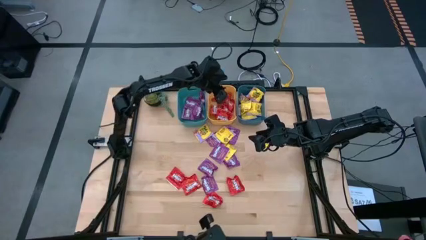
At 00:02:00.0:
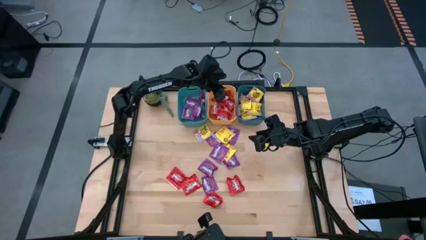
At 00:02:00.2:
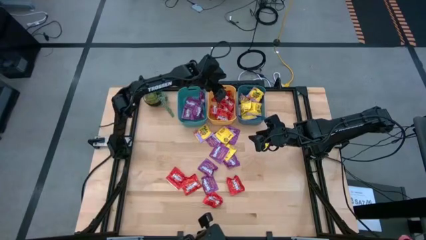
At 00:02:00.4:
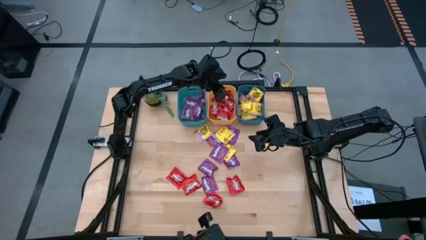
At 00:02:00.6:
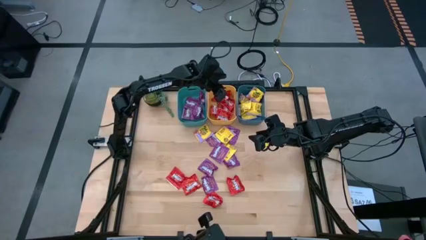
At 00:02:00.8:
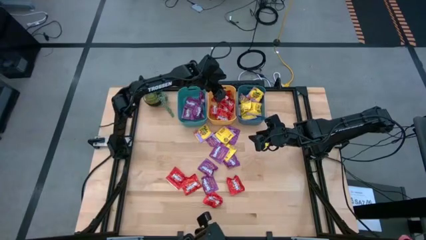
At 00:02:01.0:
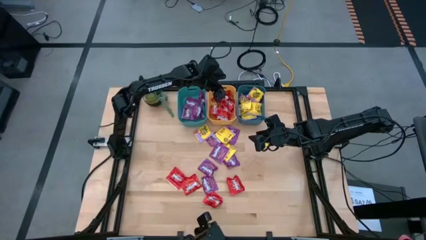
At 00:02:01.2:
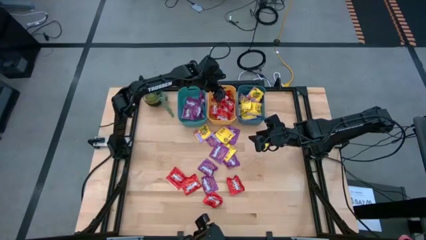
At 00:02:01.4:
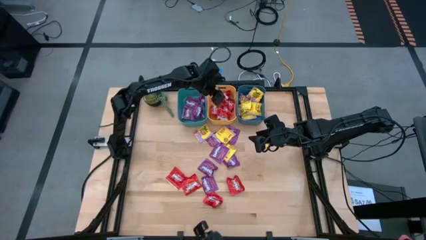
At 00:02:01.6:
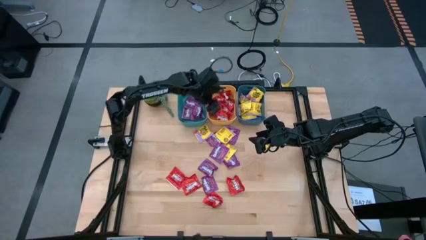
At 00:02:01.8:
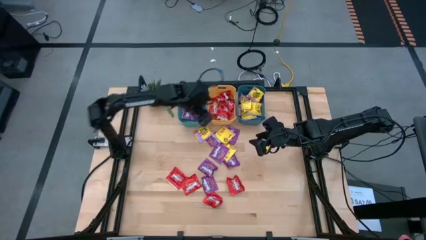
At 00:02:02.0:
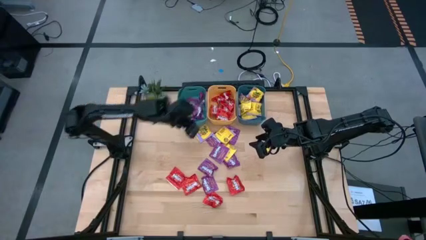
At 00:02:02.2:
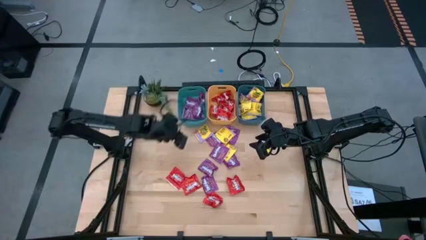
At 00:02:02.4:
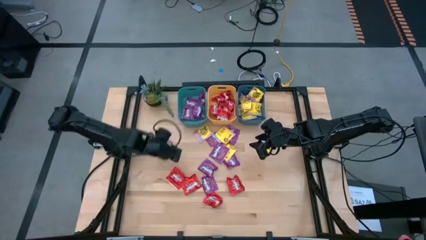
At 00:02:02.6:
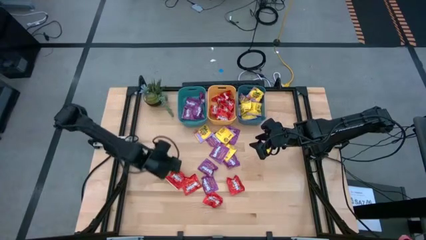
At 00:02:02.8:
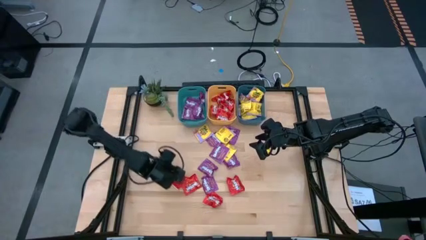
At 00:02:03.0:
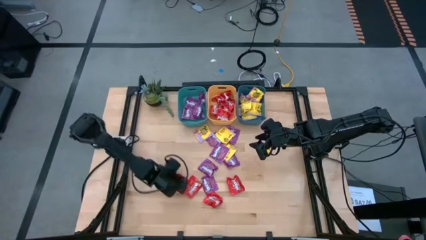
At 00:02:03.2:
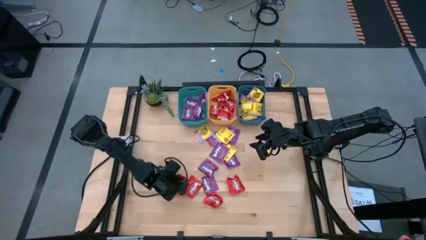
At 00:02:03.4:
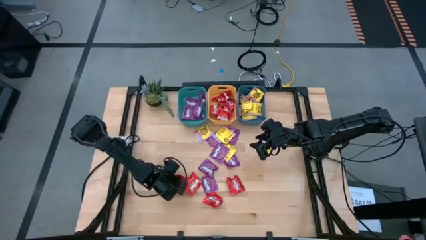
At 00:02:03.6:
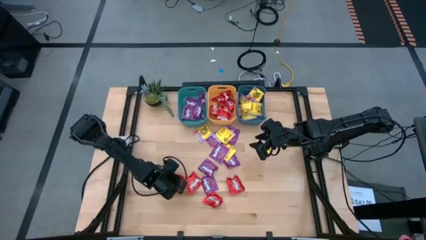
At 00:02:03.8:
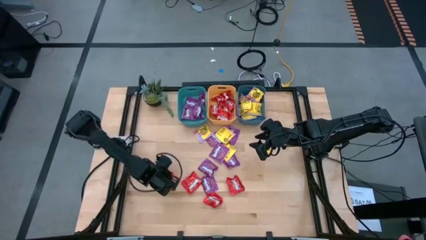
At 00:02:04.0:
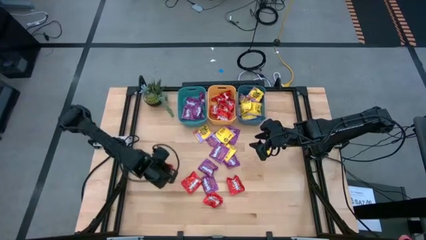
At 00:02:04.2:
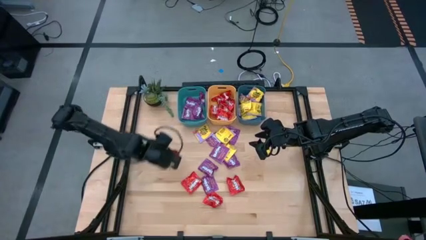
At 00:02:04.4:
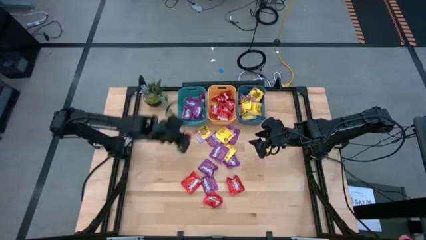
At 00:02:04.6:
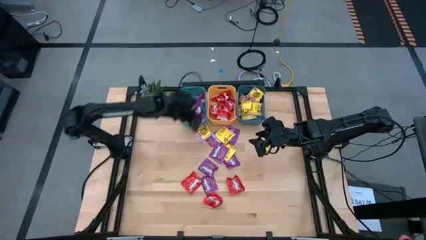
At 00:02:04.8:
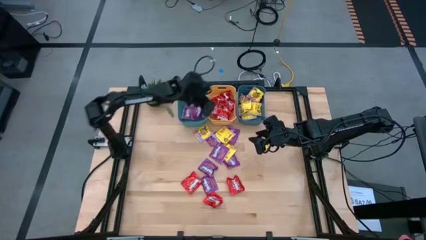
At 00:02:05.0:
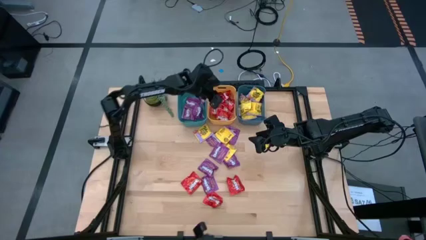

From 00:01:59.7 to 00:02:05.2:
Task: Sort candy
Put the red candy into the yellow bin

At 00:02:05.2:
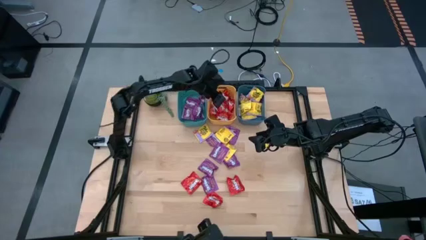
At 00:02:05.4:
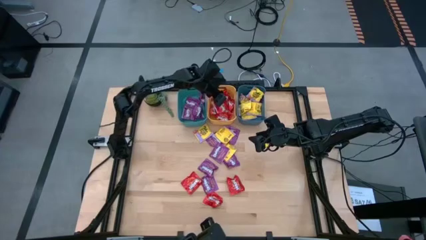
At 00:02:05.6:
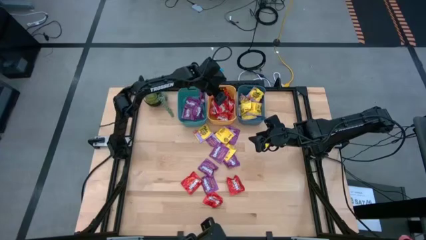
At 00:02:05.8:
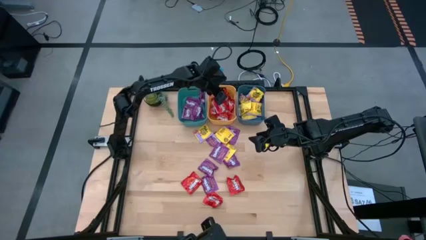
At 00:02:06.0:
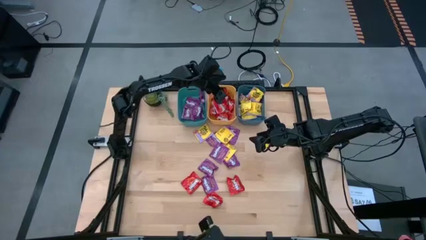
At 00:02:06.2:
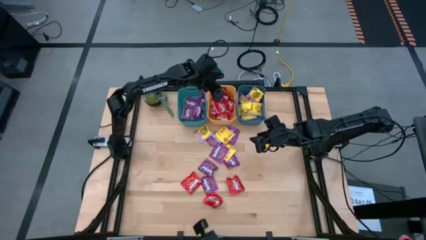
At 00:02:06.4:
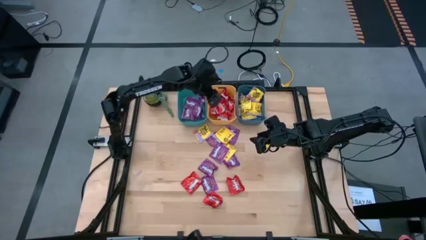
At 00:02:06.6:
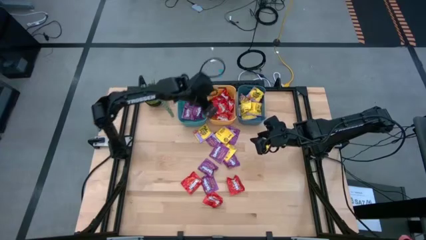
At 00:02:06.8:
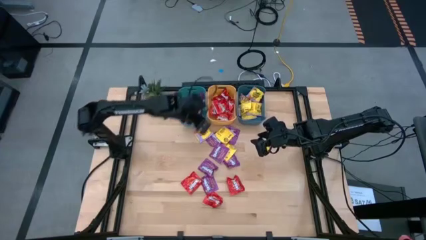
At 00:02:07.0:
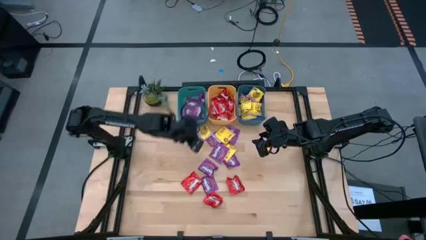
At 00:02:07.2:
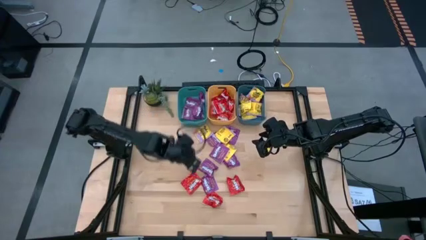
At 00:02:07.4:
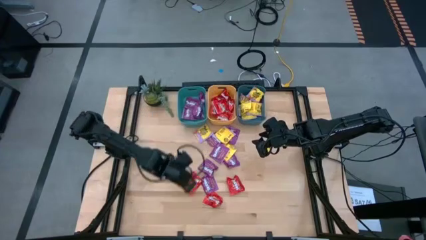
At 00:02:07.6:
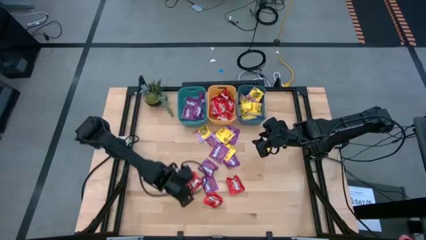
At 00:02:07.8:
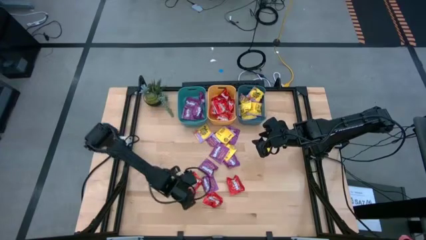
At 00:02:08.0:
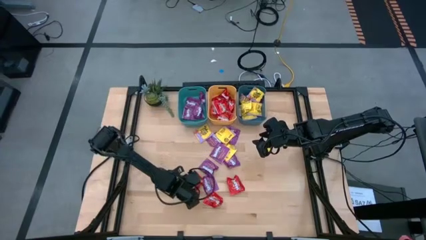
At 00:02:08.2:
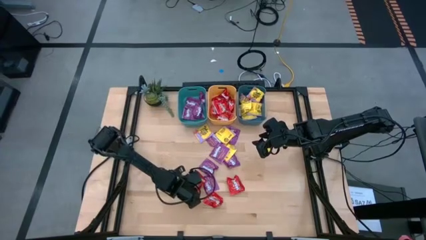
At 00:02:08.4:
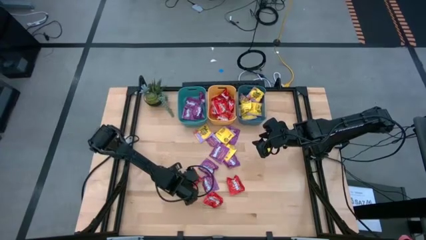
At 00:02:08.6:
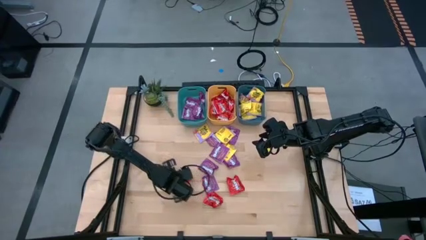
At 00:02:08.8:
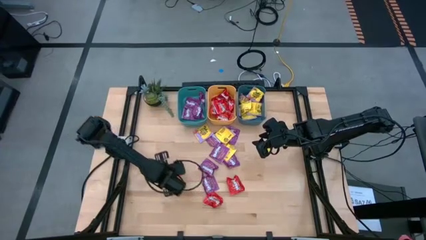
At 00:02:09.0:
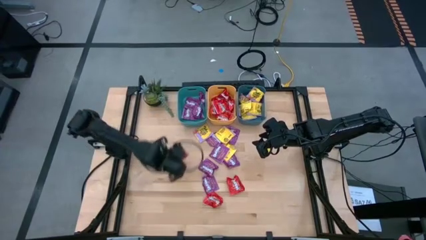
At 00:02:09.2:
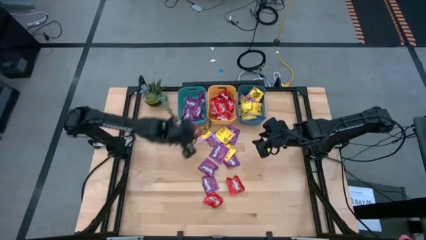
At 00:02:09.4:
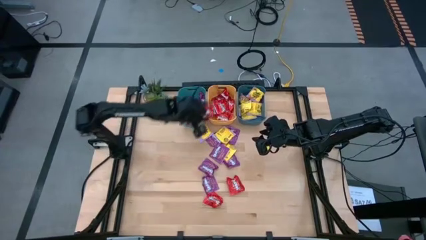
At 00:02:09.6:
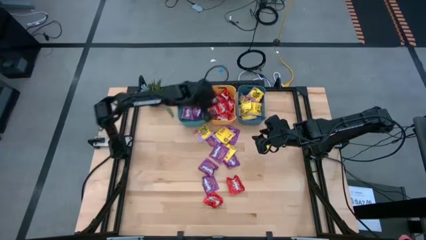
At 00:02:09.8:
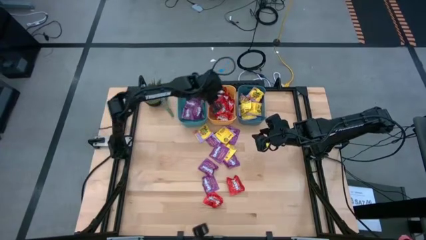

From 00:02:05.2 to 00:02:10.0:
Put the red candy into the yellow bin

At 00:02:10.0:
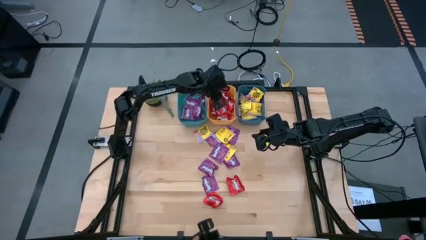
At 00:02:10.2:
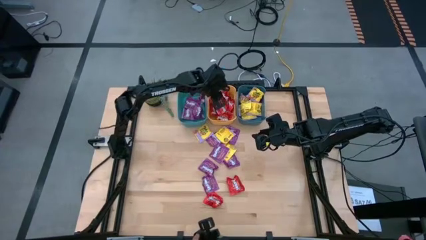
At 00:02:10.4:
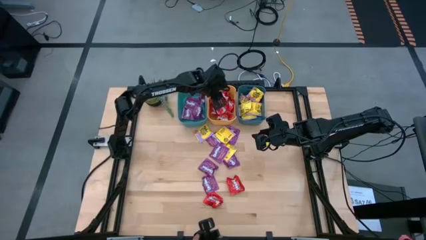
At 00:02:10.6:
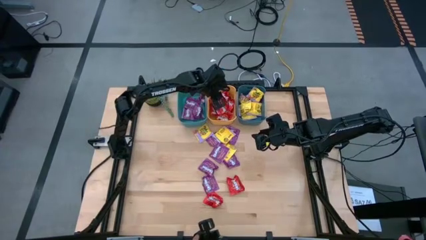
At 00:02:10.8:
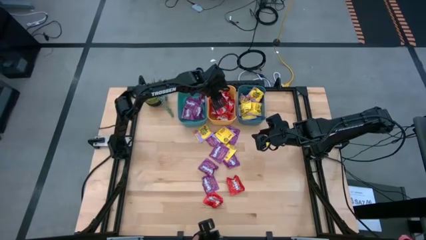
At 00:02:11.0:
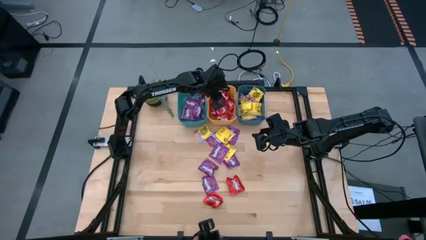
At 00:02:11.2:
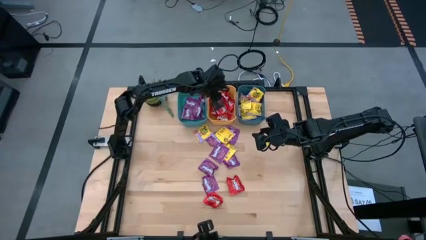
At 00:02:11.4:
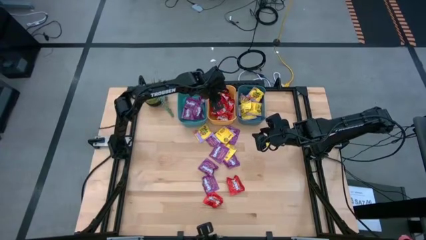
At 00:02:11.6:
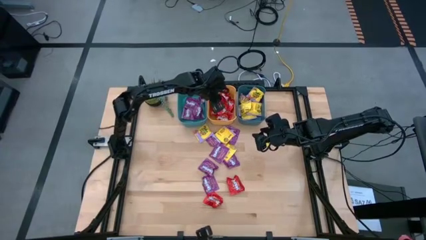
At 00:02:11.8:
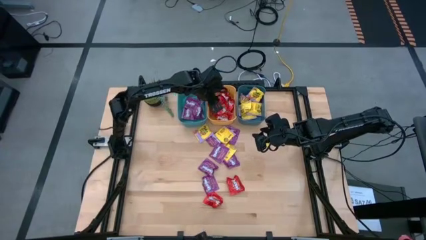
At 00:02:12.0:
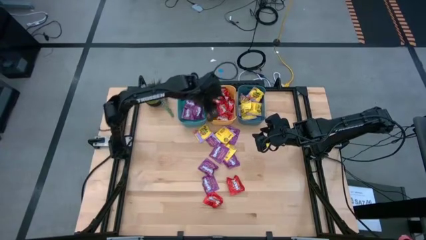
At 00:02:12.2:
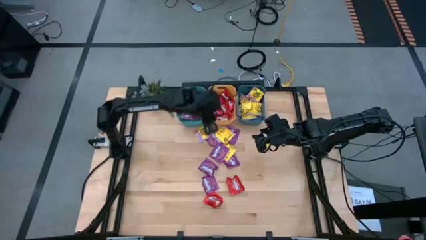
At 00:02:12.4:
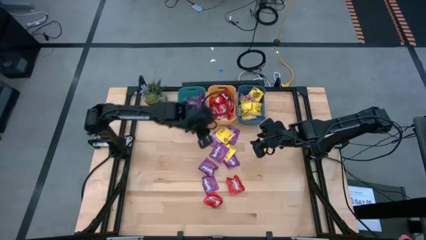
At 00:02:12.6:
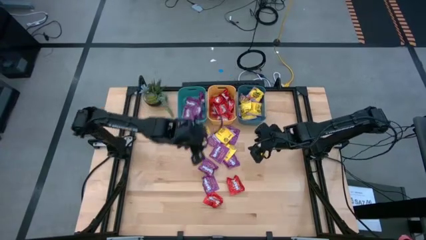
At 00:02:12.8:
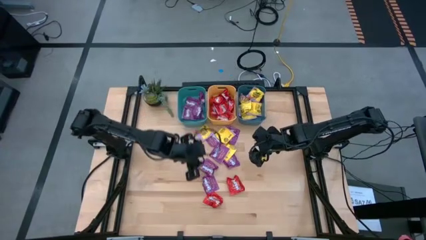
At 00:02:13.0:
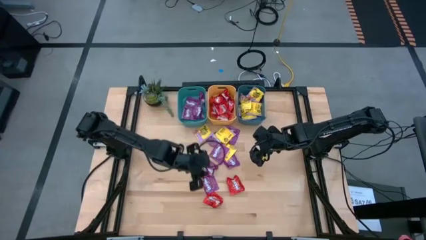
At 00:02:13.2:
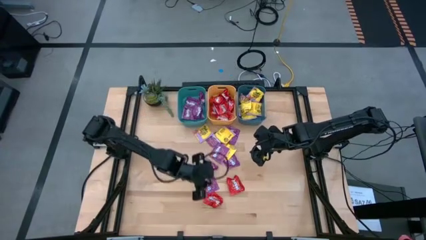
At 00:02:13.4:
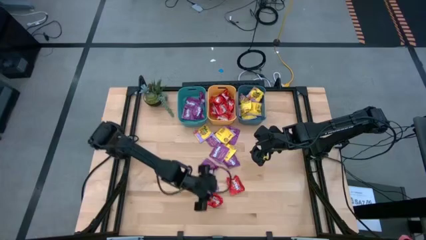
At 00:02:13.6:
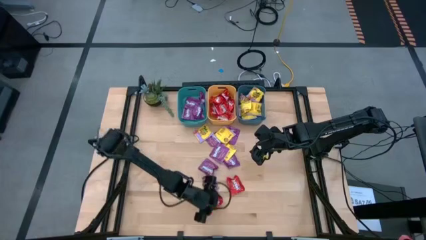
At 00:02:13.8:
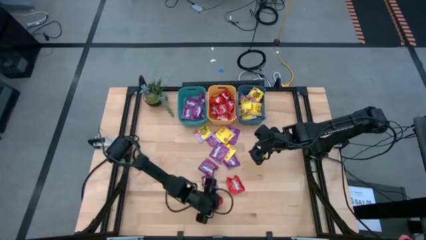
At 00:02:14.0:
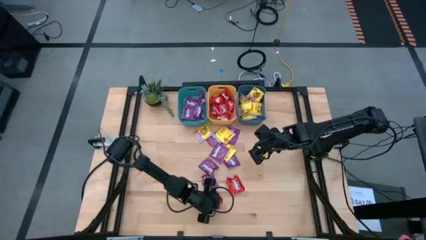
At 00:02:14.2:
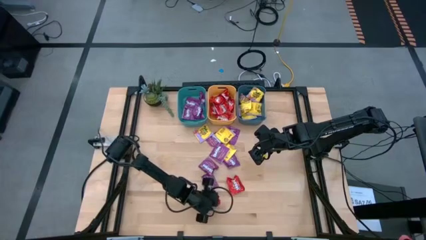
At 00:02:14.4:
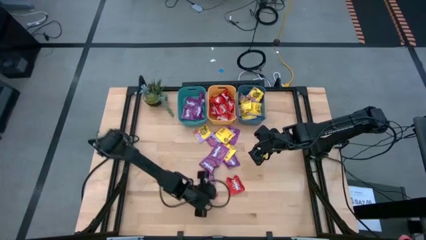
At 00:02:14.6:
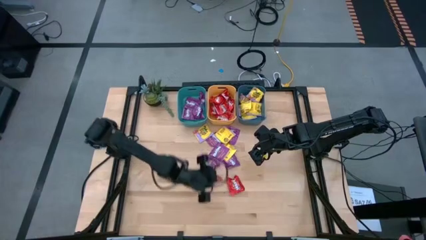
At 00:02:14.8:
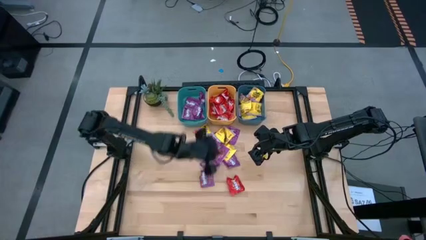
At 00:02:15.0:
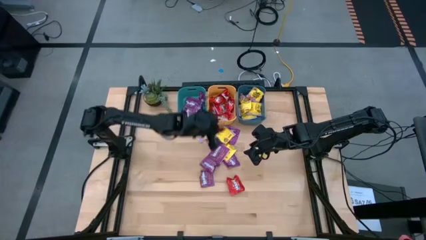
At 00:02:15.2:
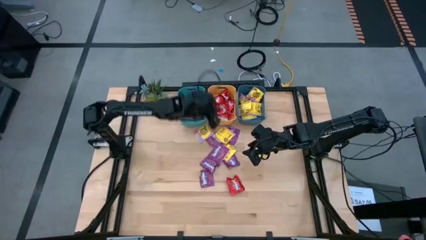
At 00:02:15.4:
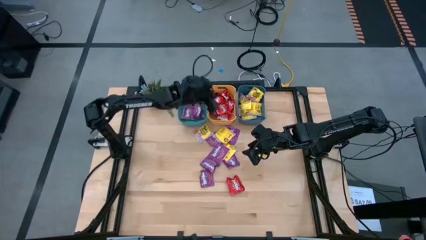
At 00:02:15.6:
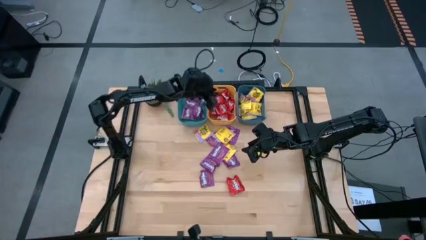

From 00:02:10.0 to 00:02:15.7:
Put the red candy into the yellow bin
